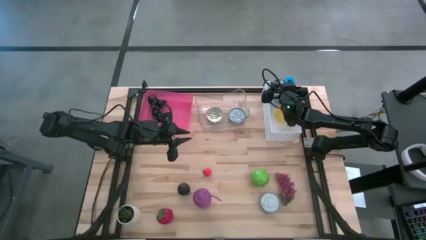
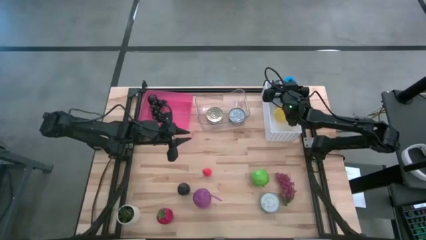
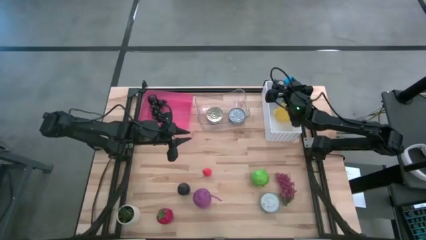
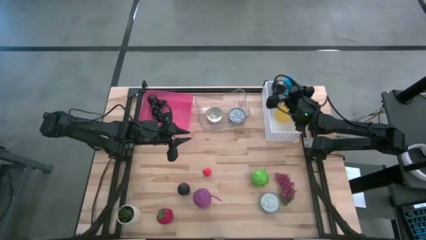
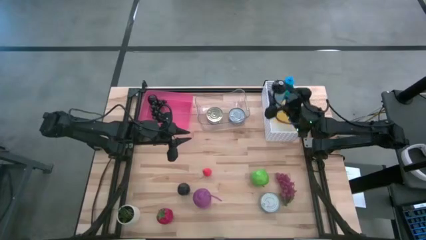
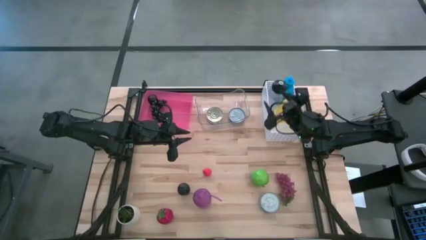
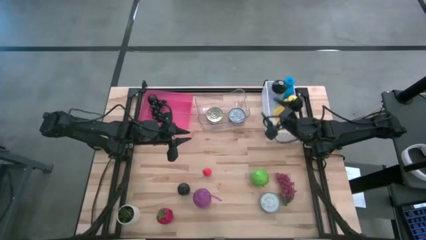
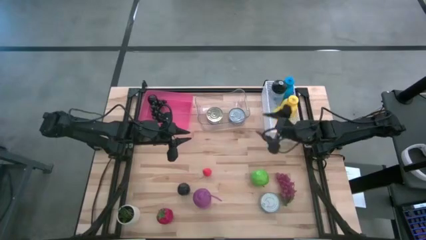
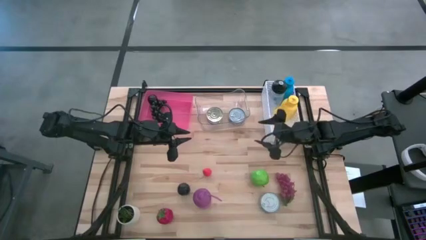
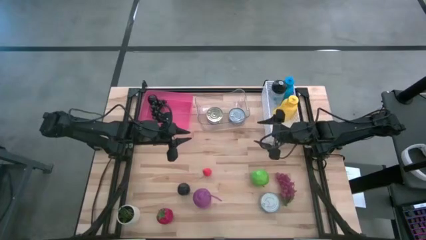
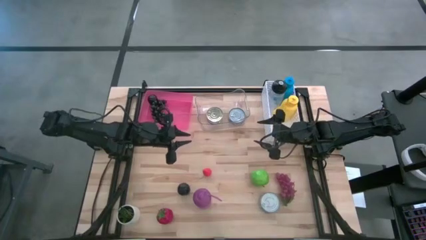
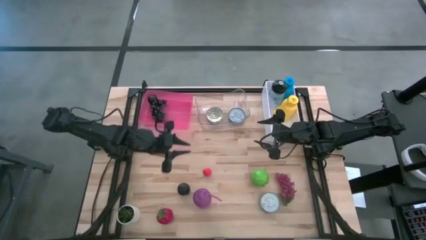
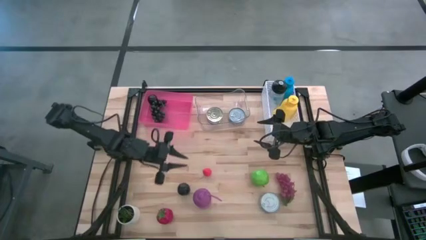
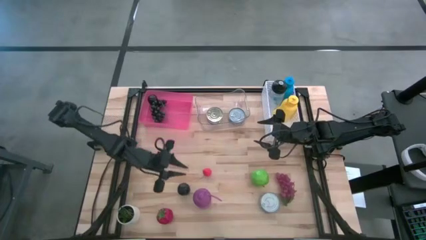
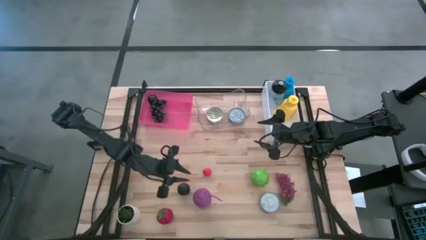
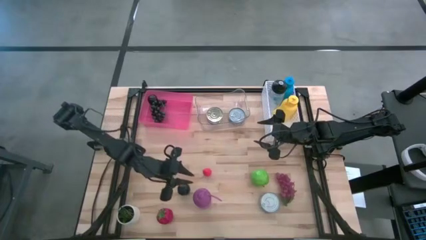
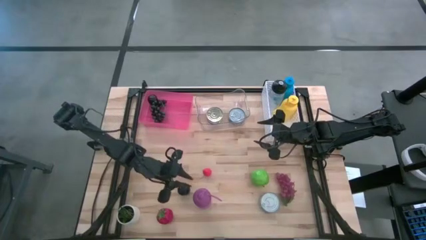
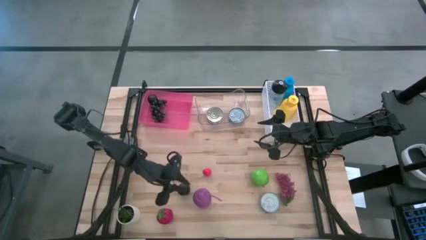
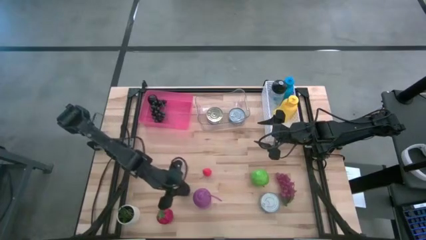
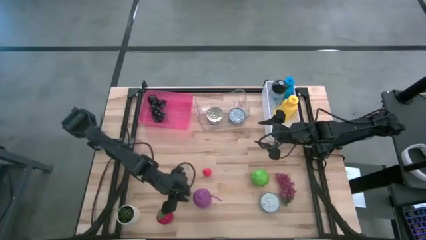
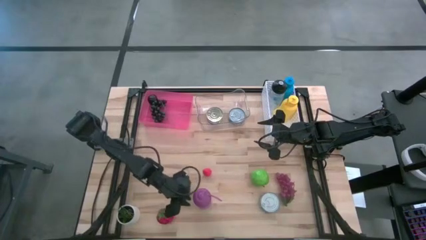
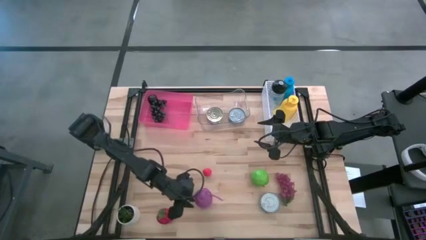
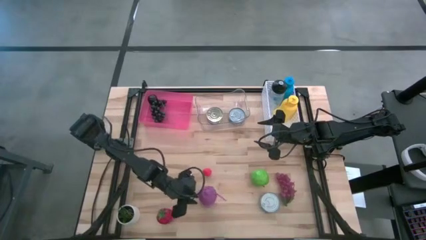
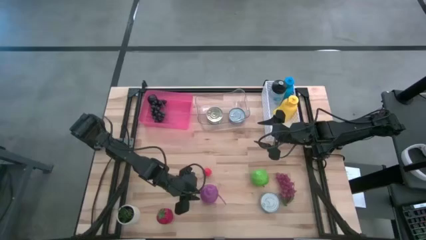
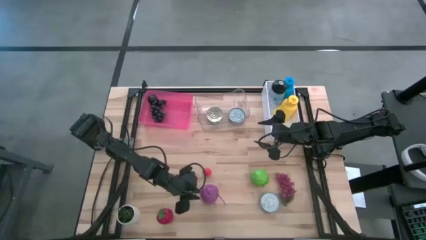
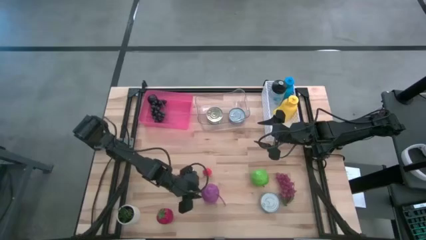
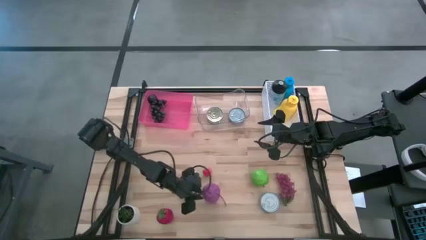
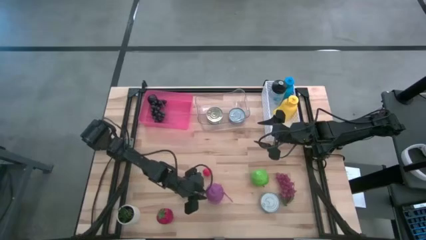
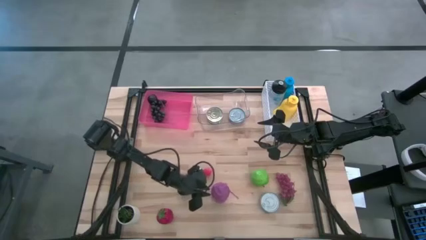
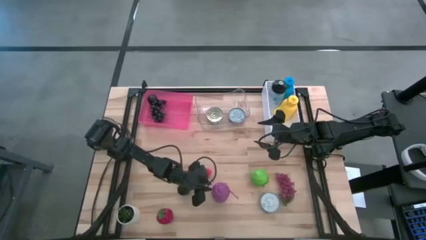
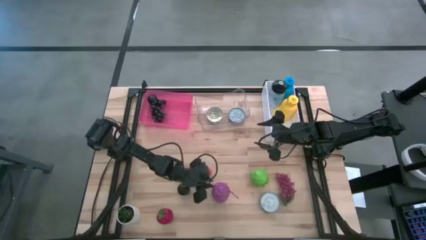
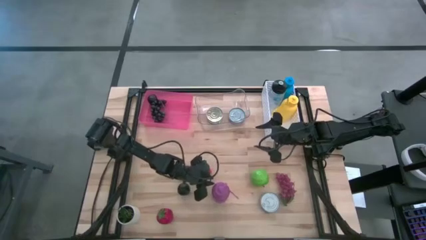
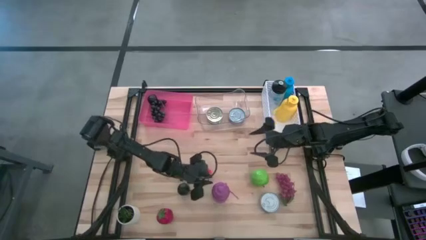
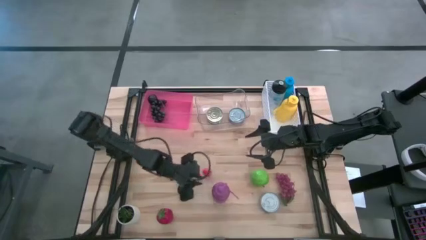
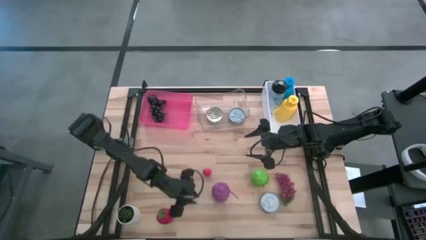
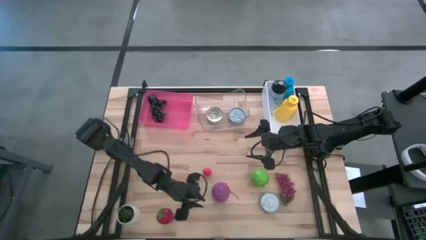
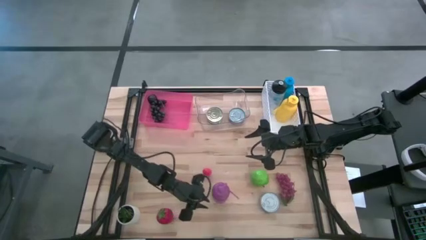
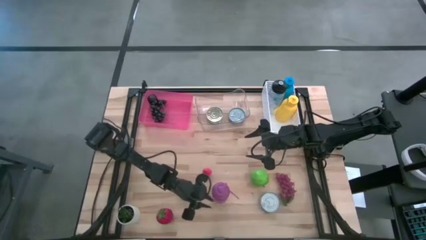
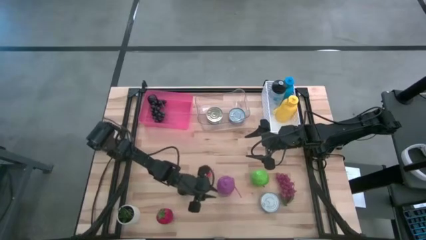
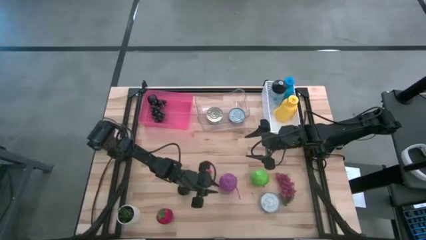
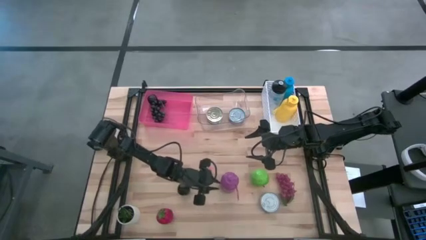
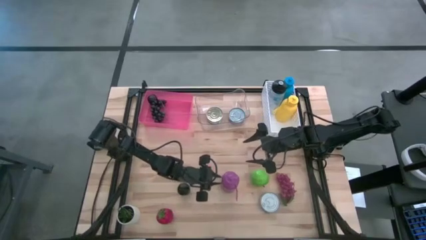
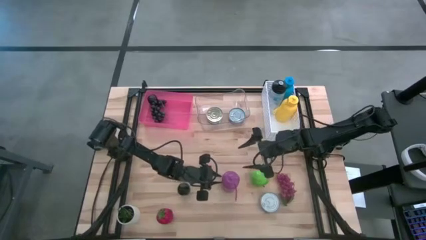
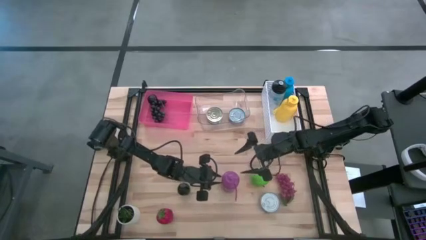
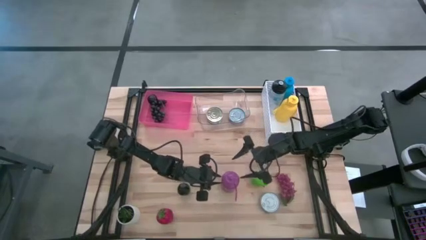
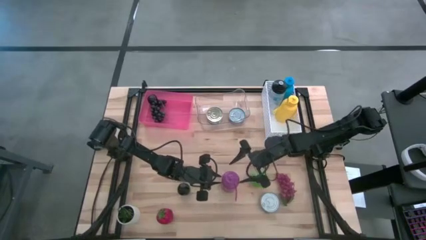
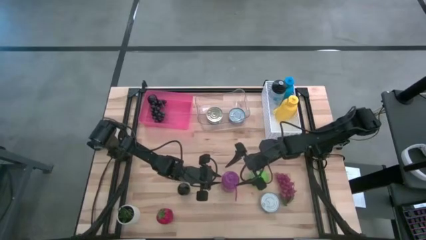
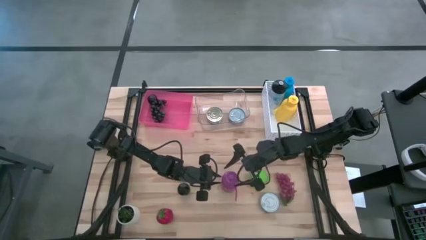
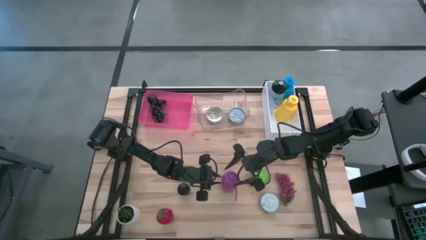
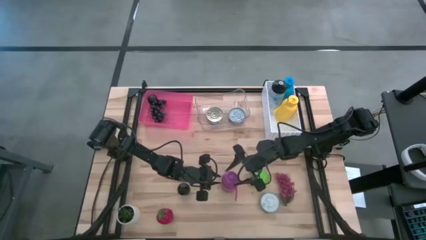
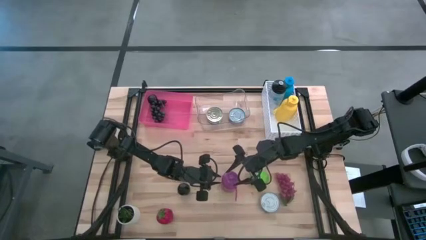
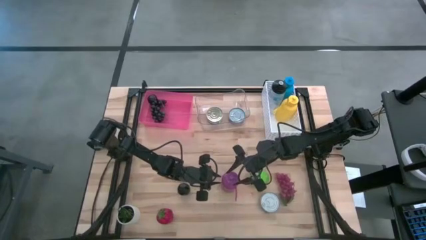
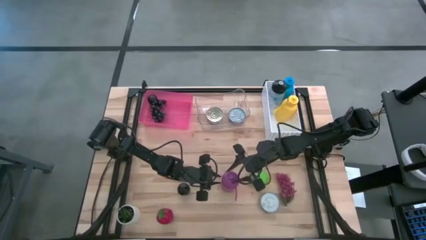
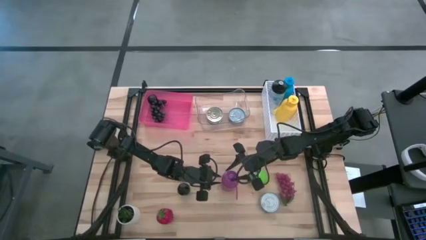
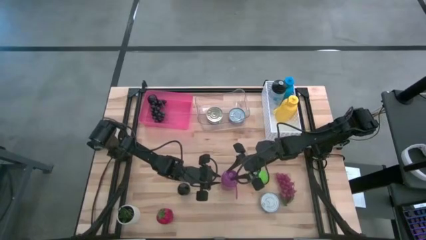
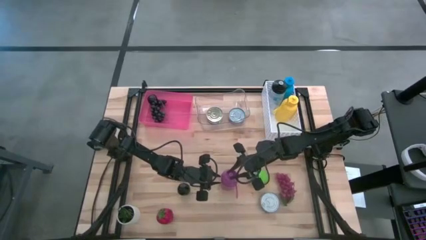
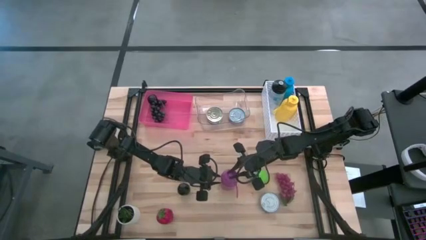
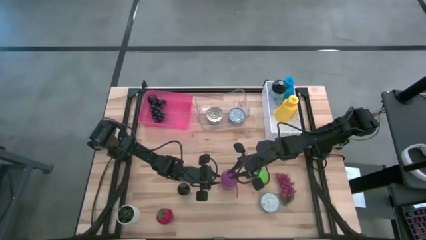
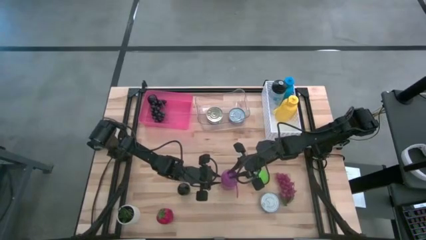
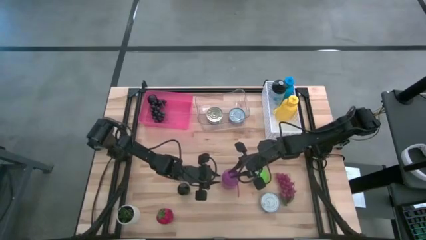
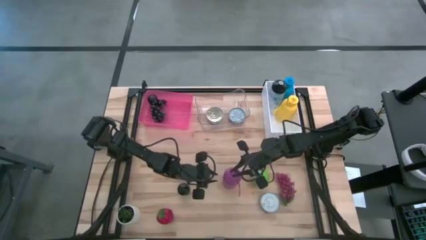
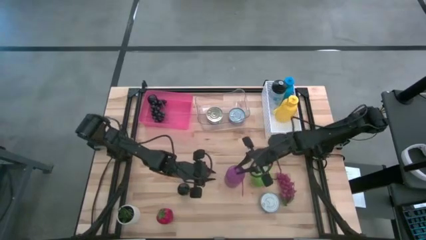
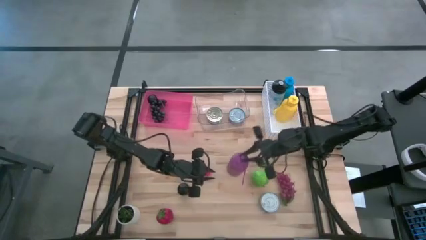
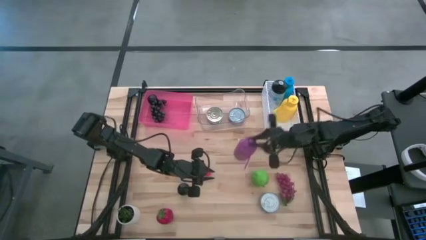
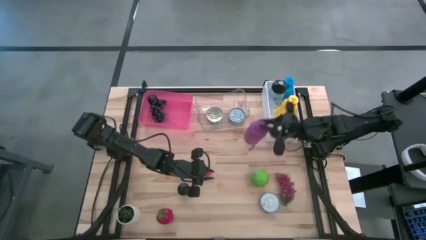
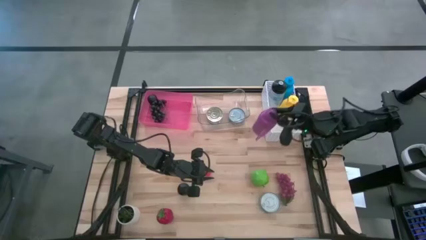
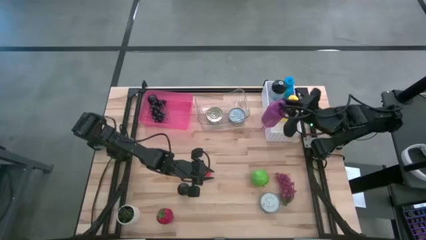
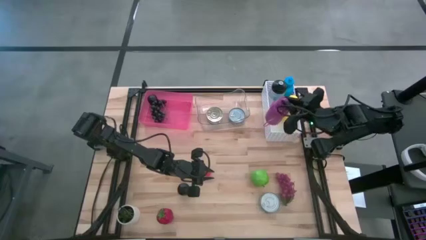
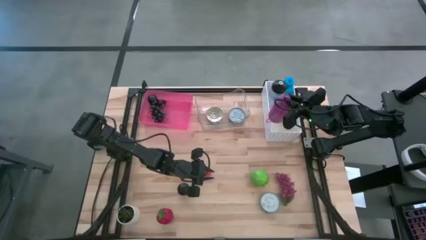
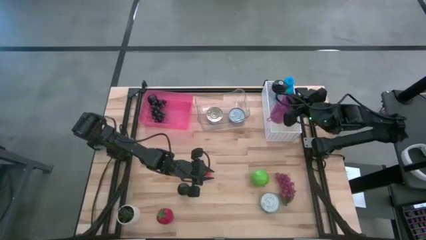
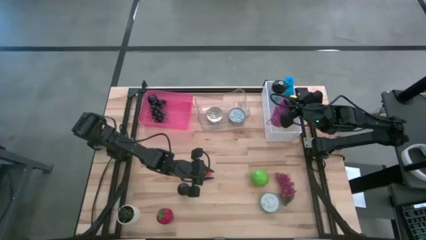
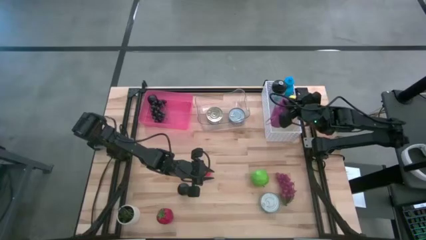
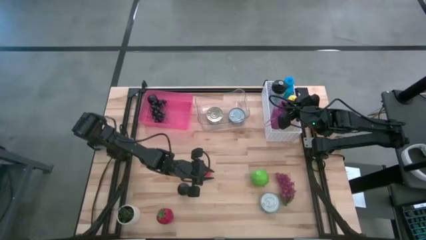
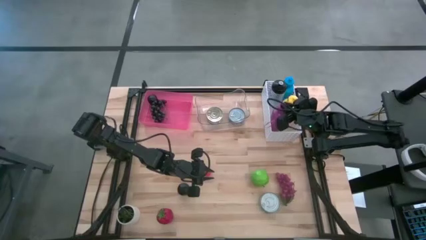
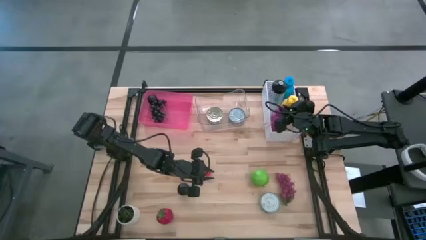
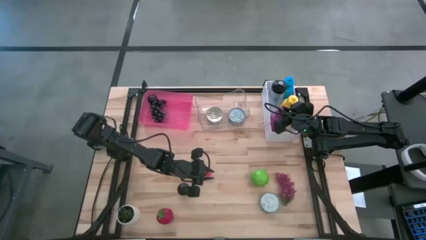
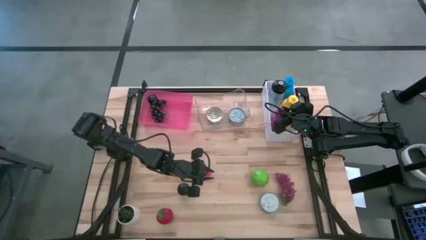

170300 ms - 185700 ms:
Task: Pick & Place Food Item
Put the purple water bottle into the white bin
